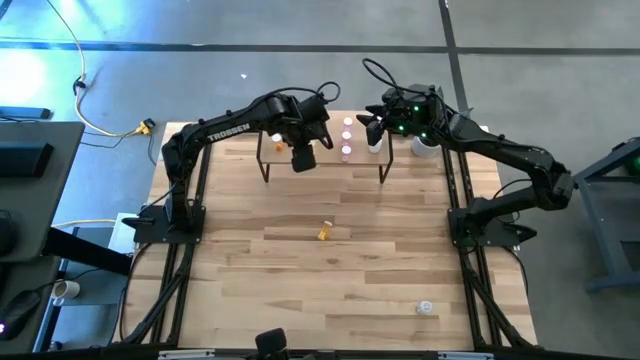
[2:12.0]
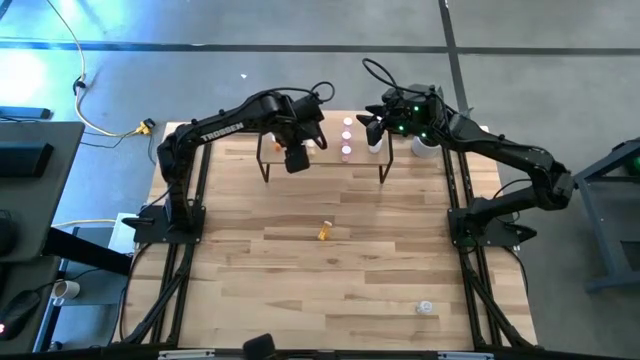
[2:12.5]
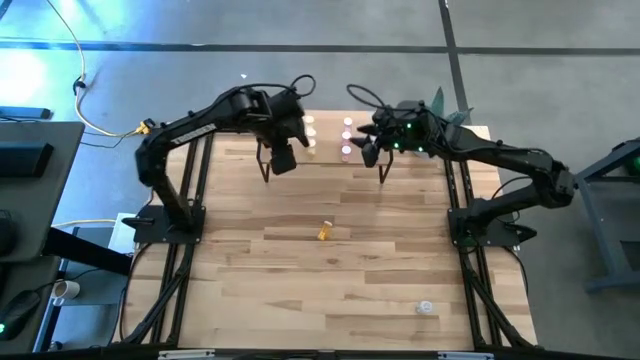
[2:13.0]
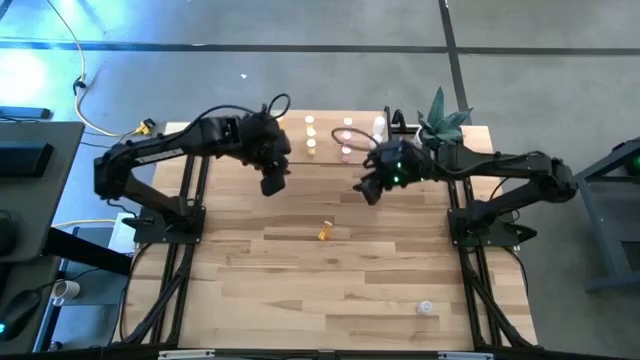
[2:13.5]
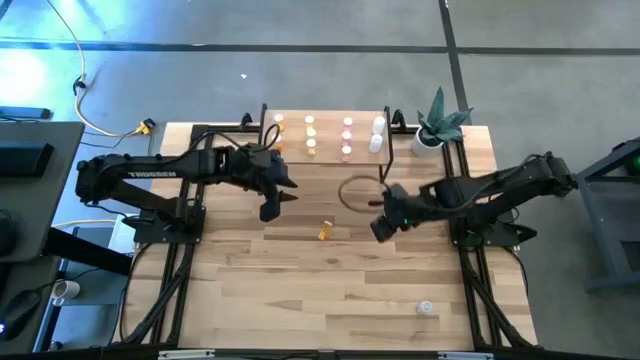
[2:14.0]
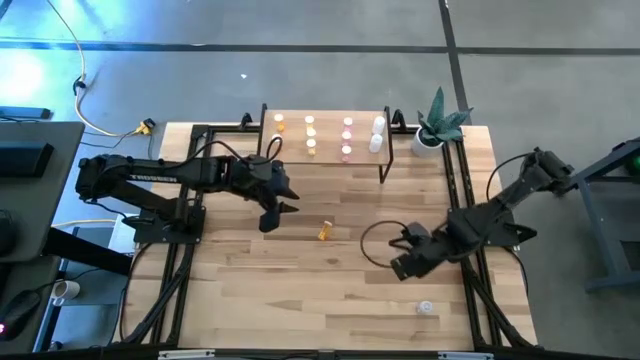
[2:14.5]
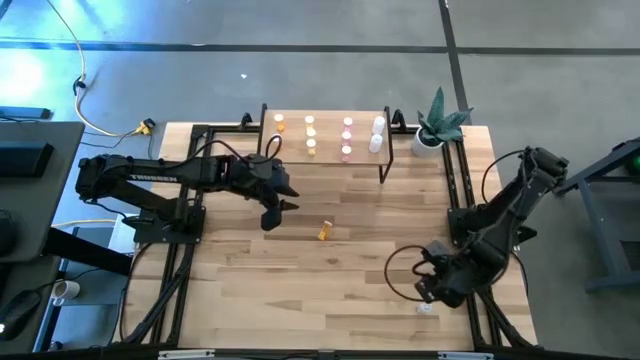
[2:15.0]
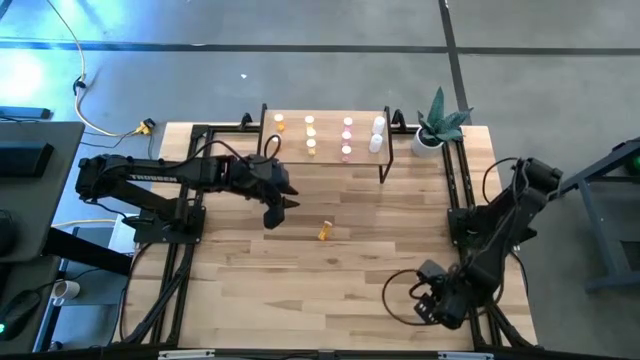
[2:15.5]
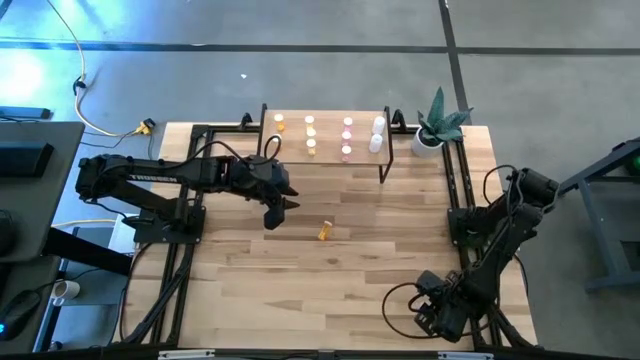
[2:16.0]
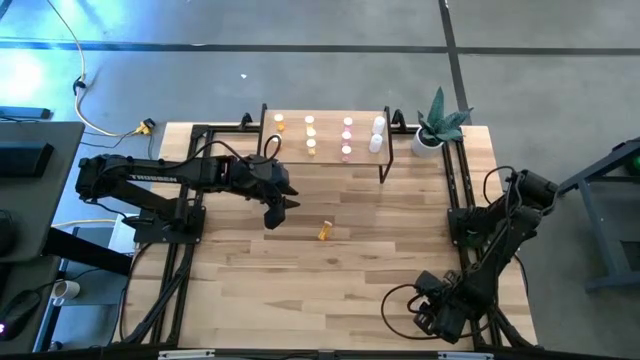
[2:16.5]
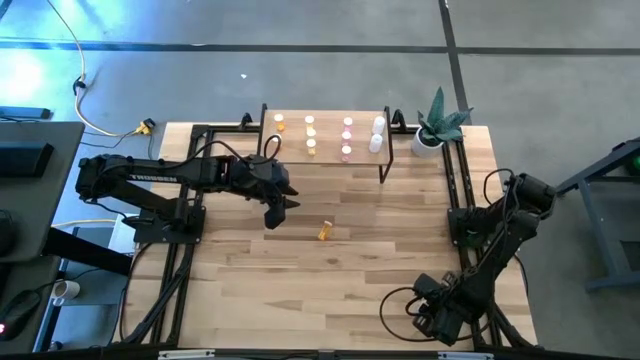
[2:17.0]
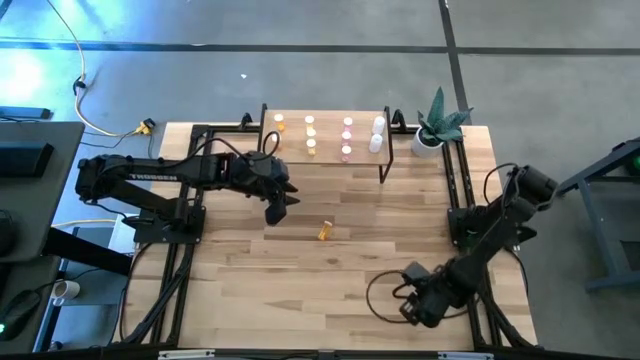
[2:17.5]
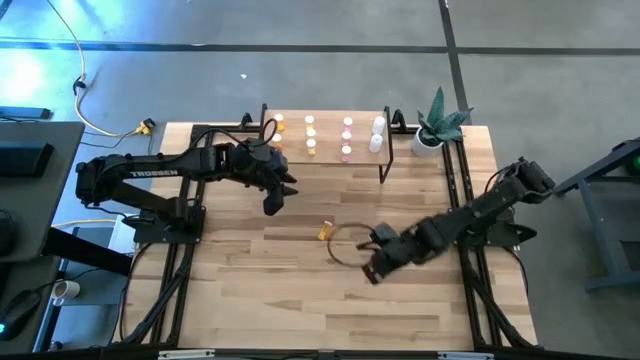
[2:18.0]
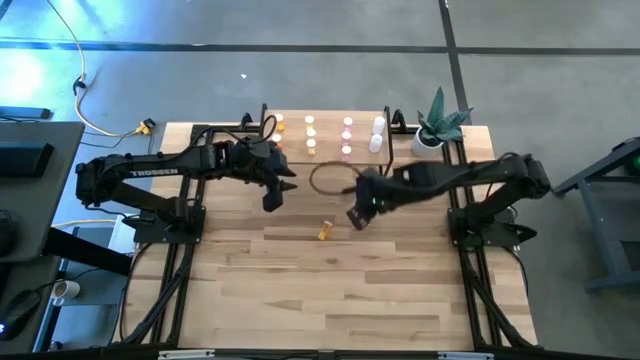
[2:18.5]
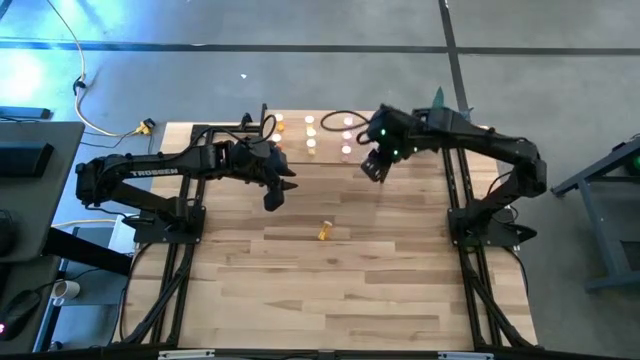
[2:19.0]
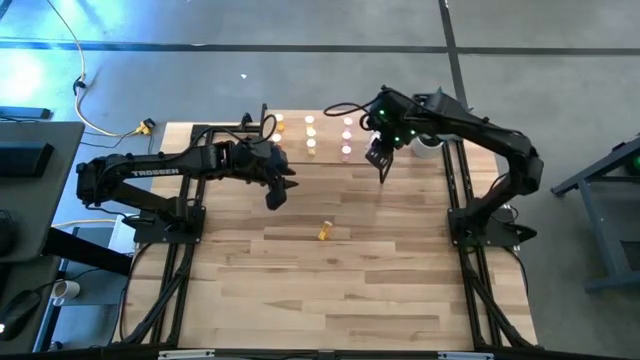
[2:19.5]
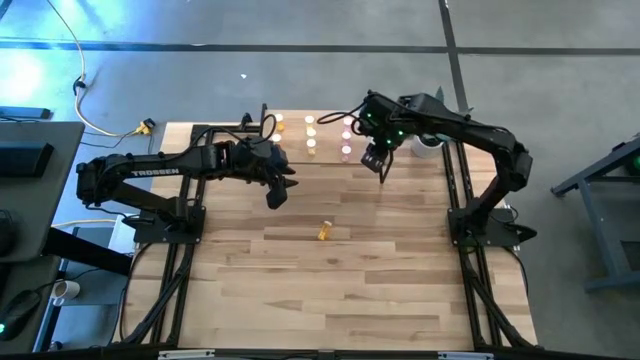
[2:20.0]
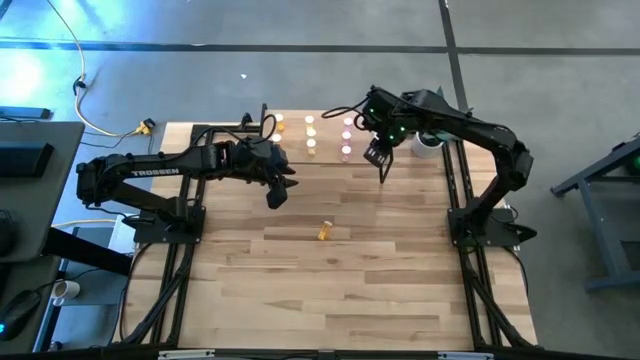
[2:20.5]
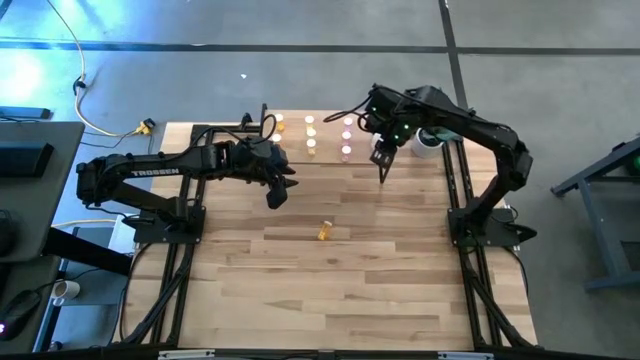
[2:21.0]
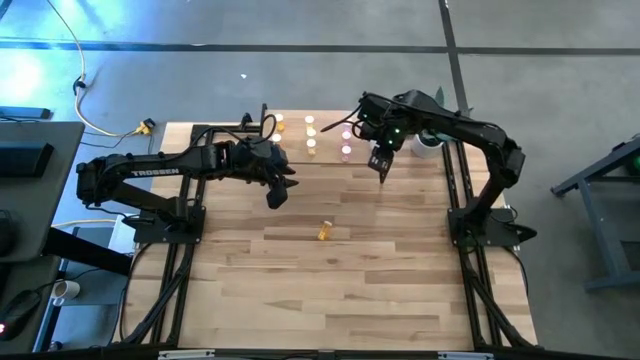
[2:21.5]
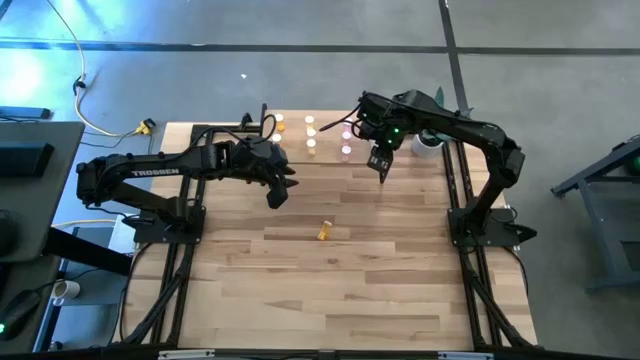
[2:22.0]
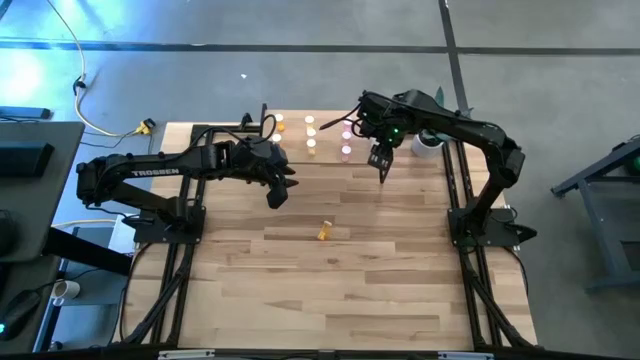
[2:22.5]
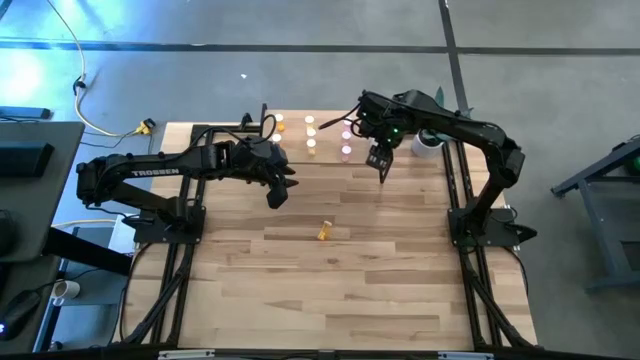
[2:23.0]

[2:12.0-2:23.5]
Task: Pick and place medicine bottles onto shelf by color
Put the transparent pill bottle on the shelf aligned with other white pill bottles

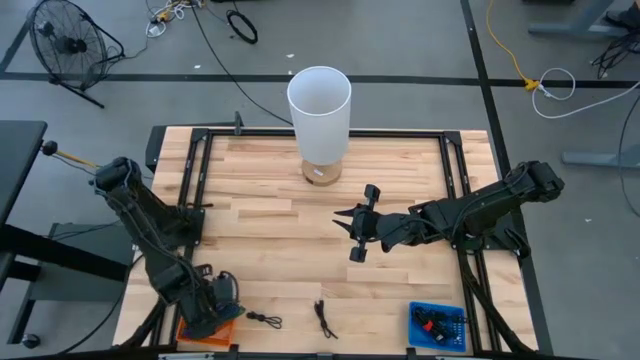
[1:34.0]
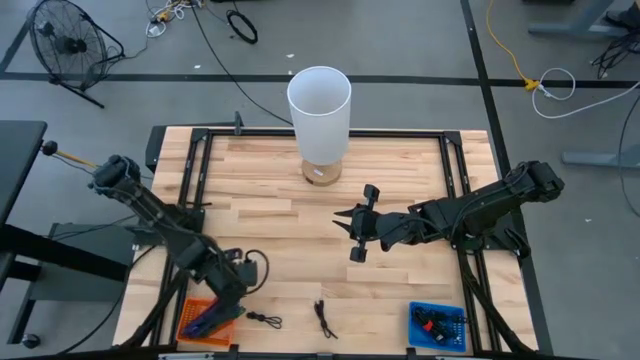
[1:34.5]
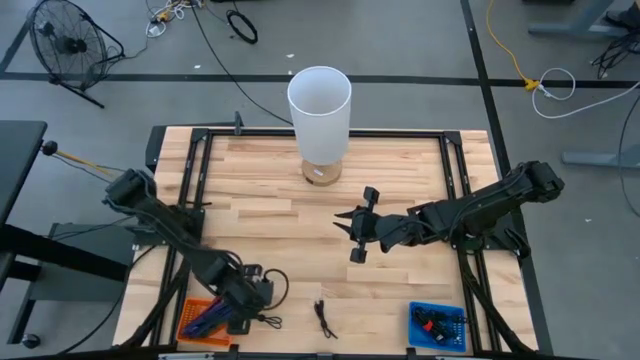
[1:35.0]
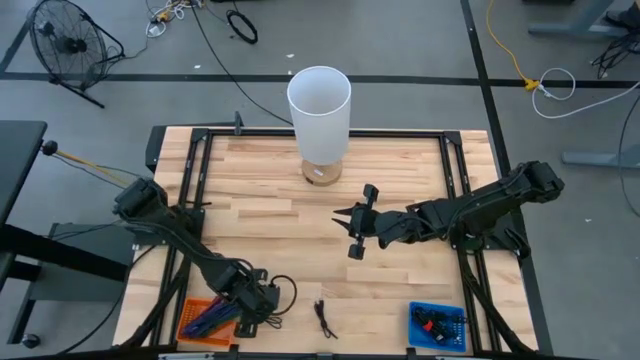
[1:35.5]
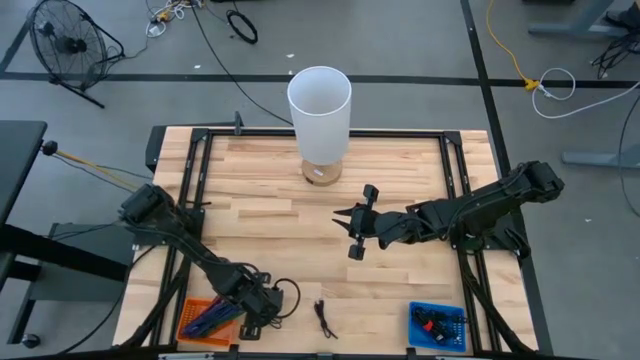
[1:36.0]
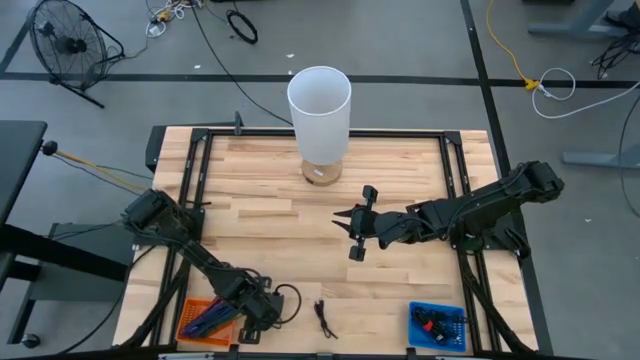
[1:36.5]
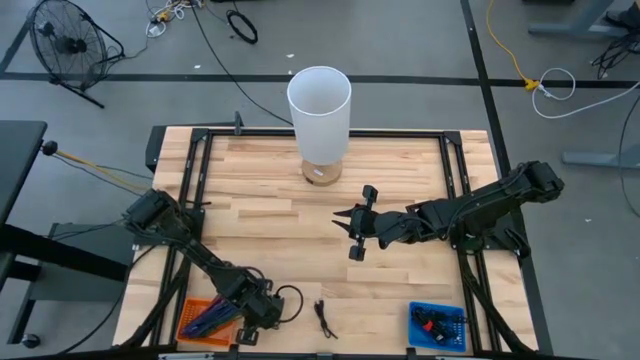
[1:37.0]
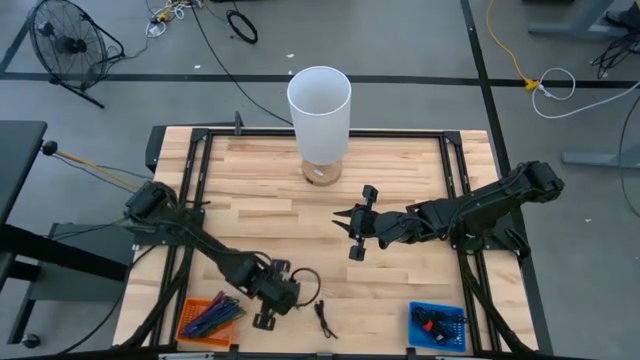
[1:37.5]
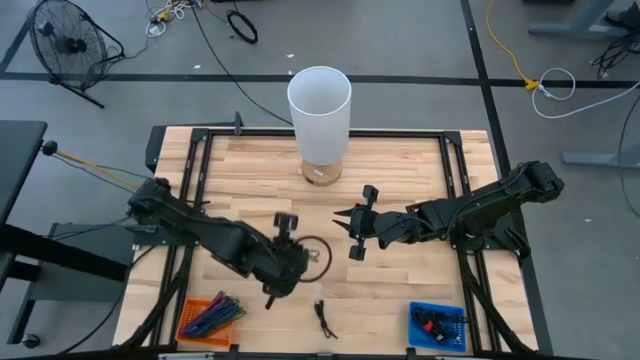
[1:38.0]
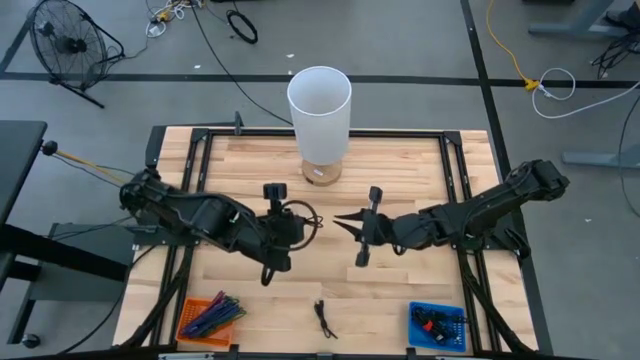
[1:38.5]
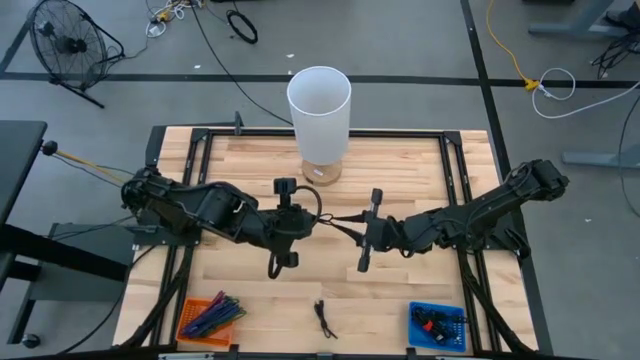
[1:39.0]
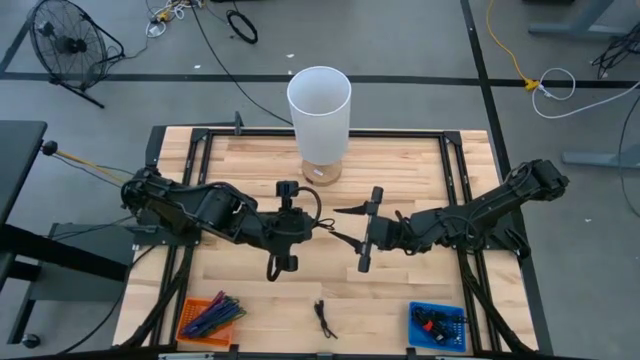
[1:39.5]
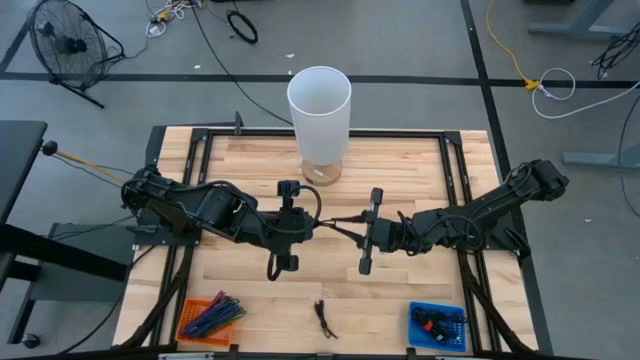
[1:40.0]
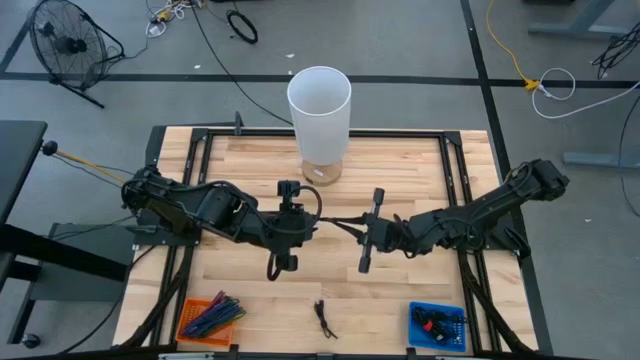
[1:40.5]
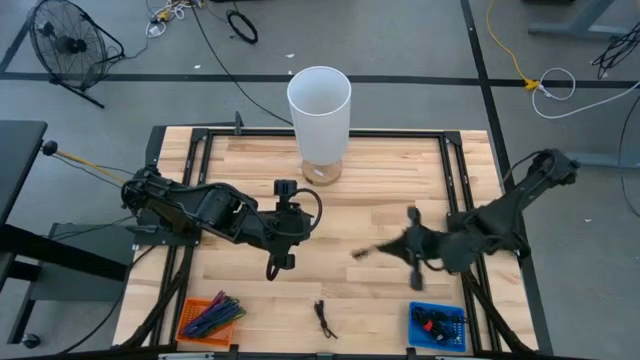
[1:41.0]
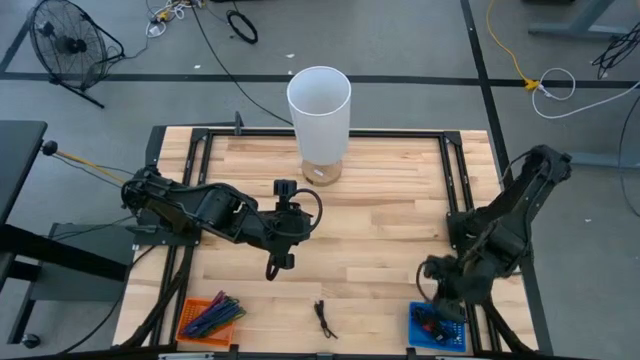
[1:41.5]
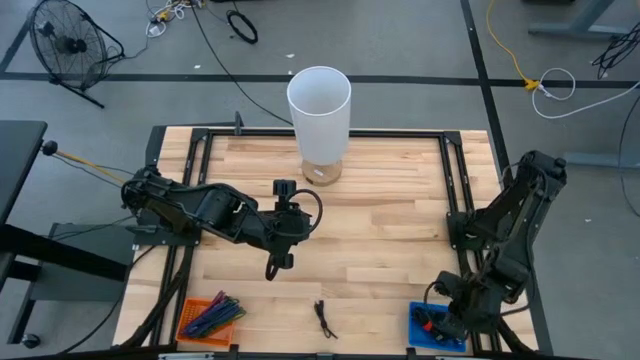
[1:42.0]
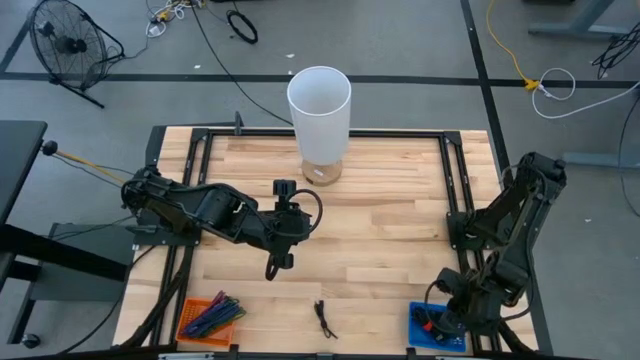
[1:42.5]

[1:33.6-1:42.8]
Task: Pick & Place USB Port
Put the black charger cable into the blue bin
